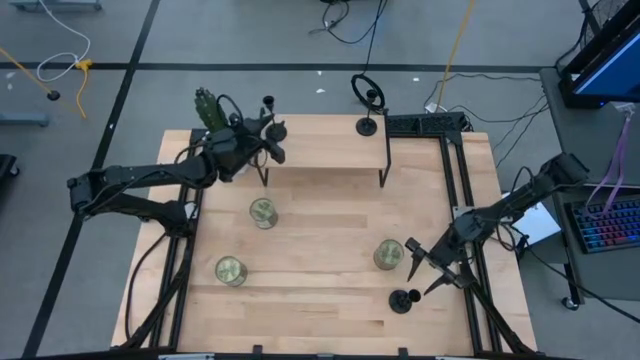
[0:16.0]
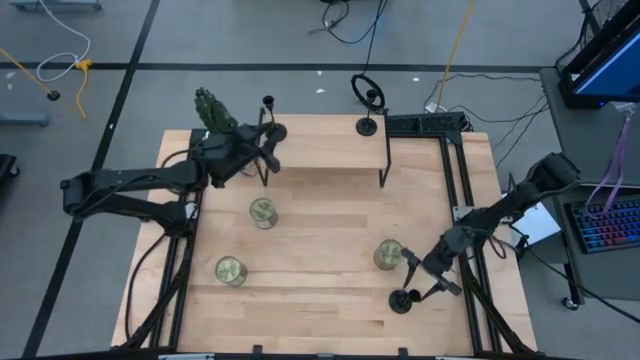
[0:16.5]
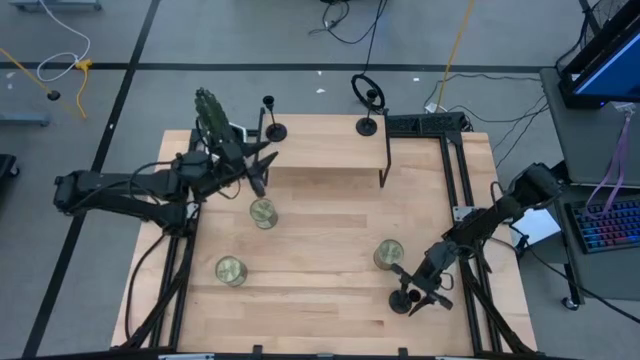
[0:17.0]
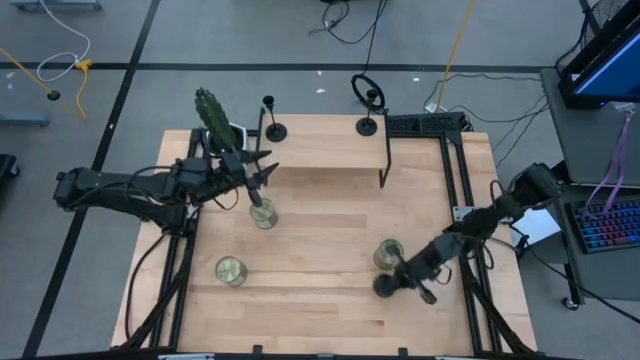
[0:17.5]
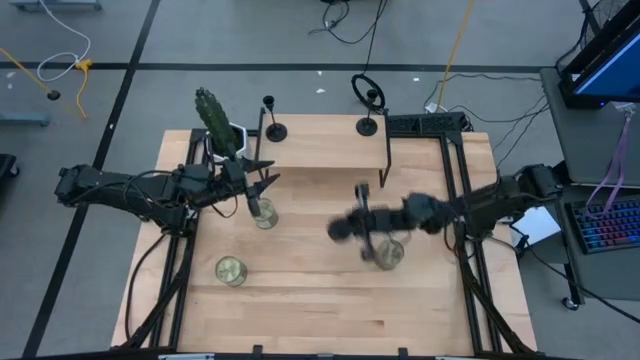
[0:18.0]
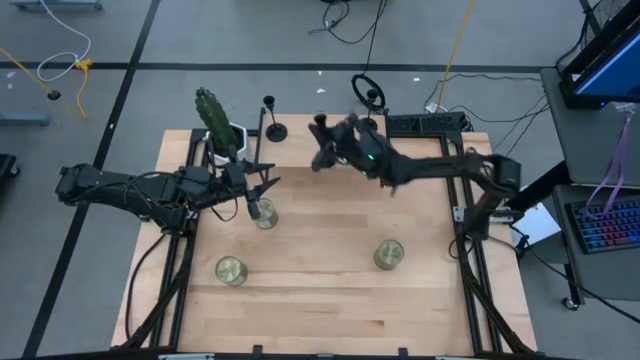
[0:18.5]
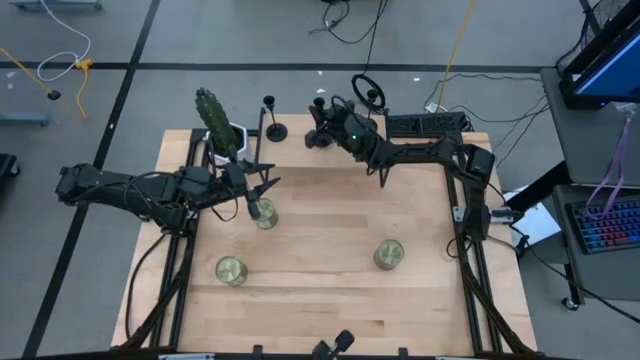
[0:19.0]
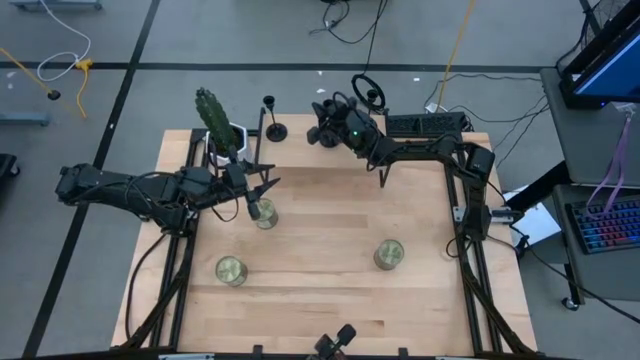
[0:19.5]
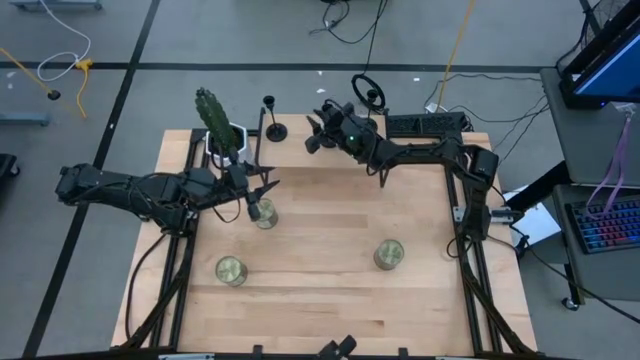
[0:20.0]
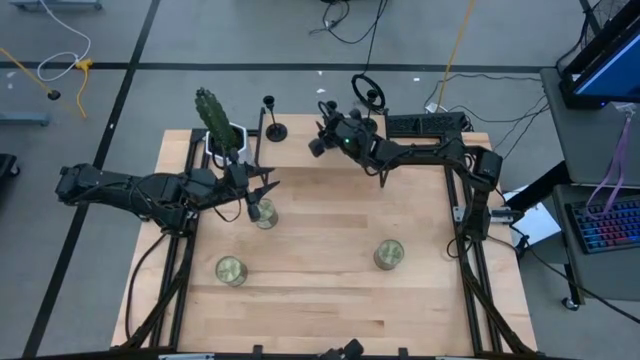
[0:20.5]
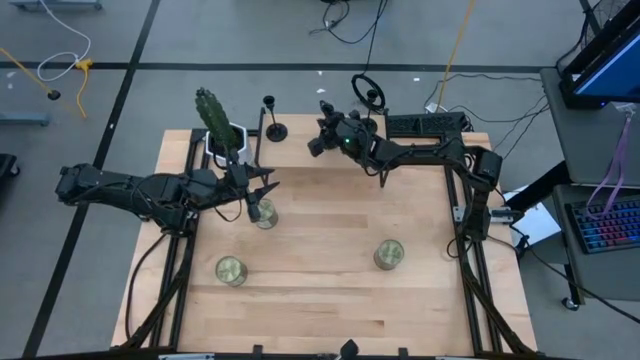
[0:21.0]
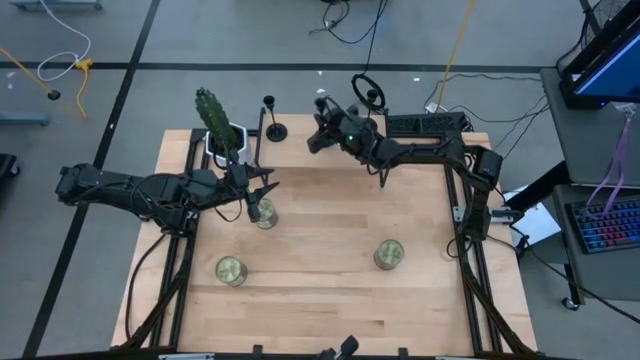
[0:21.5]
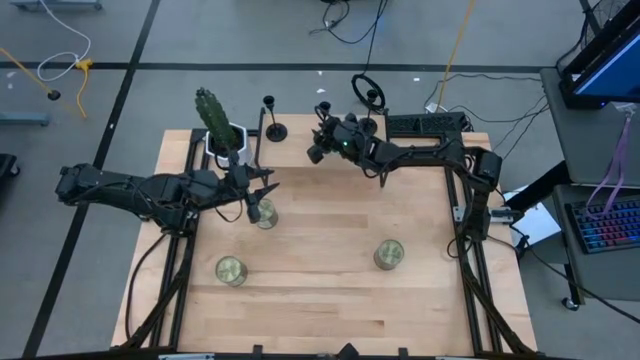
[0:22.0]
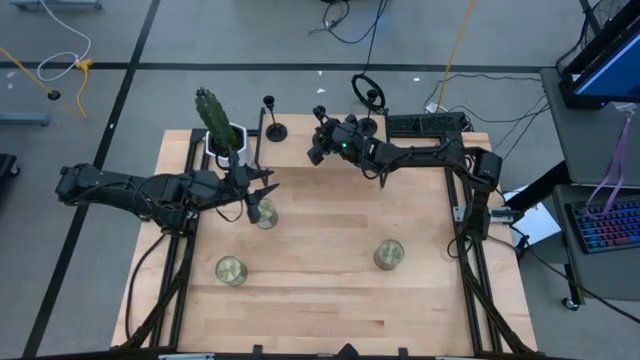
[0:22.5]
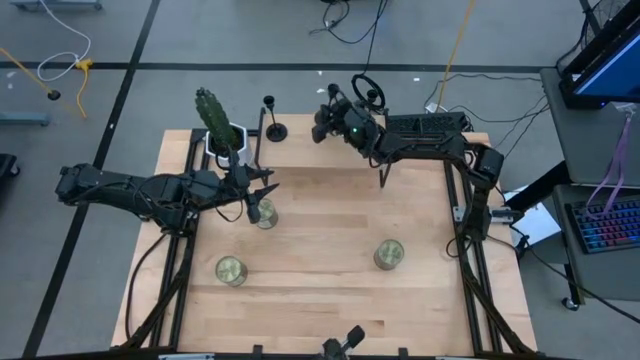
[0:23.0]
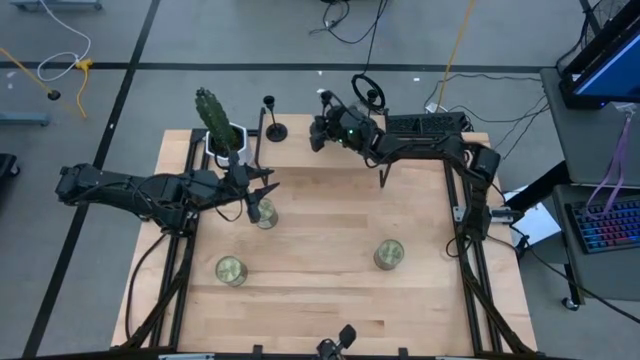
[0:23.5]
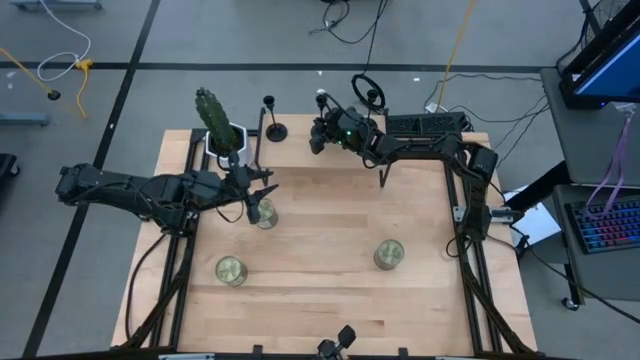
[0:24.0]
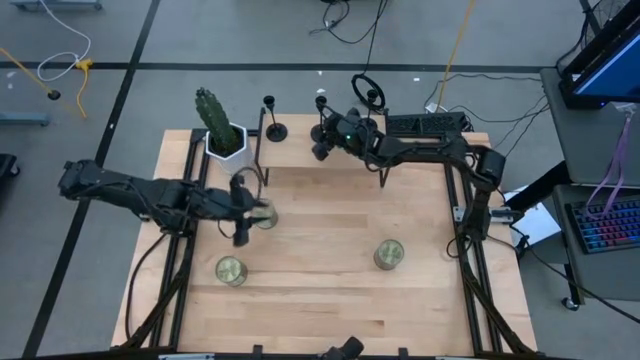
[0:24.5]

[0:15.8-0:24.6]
Task: Pick & Place candle stick holders
Put the black candle holder on the shelf

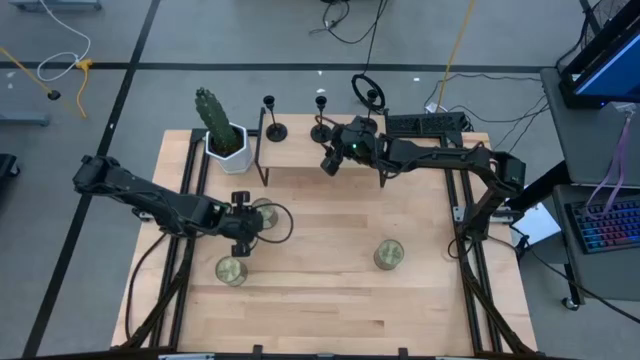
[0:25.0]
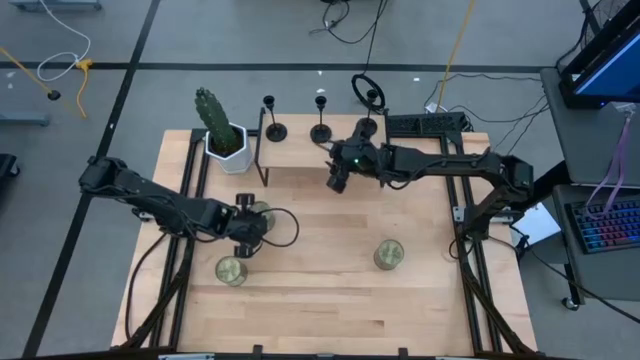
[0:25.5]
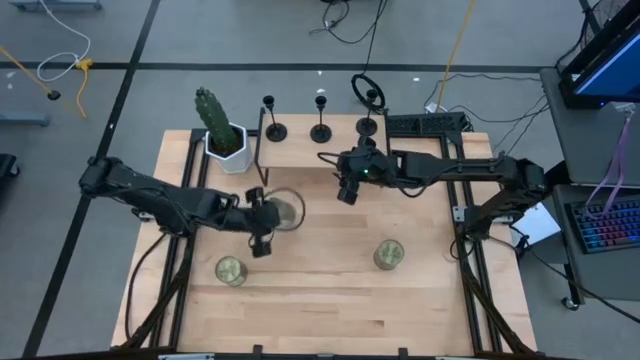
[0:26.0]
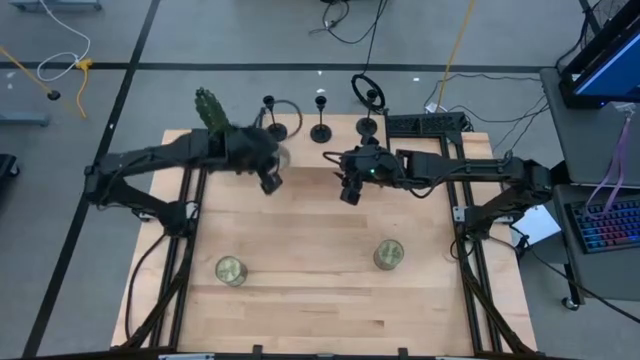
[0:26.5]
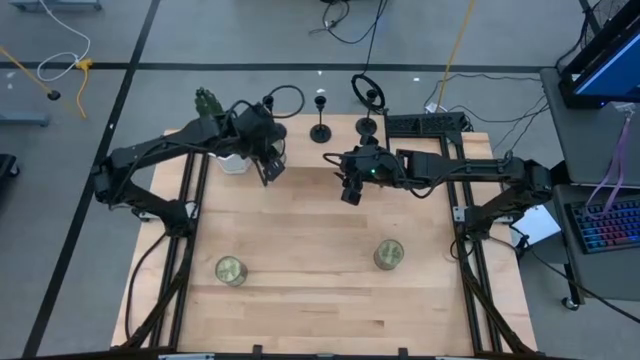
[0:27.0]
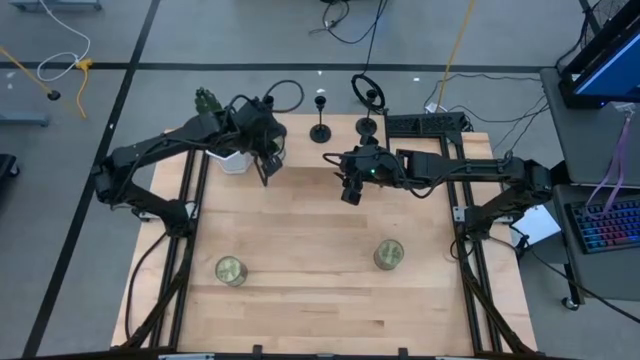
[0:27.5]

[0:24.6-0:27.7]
Put the top green scented candle on the shelf

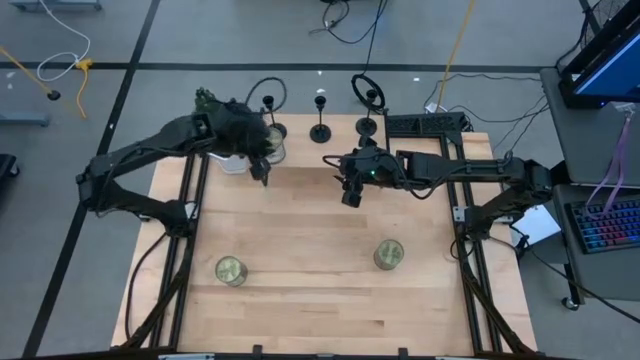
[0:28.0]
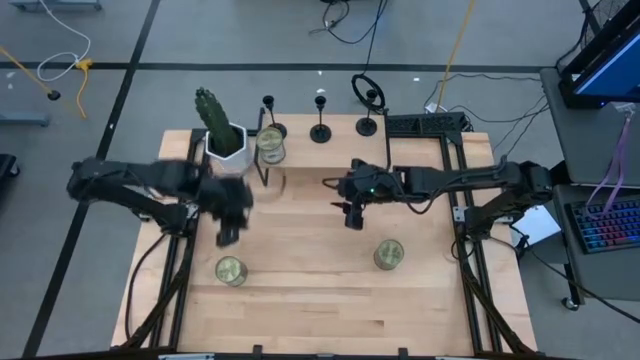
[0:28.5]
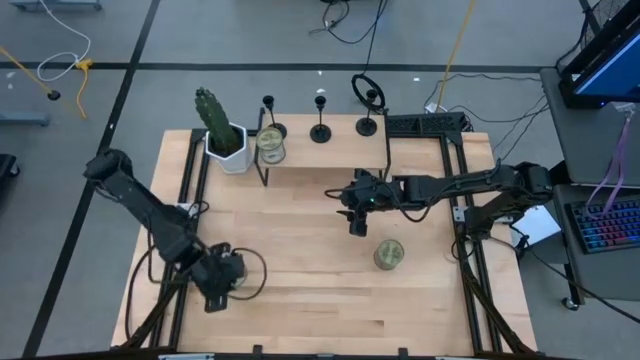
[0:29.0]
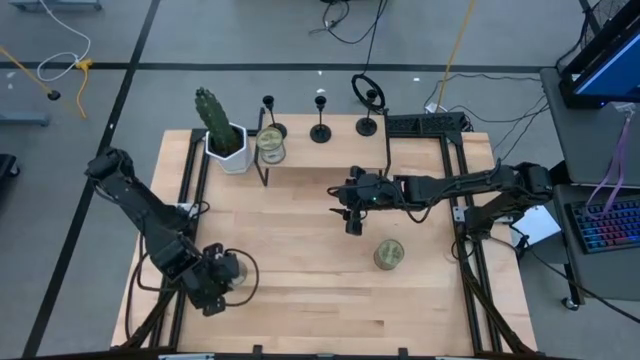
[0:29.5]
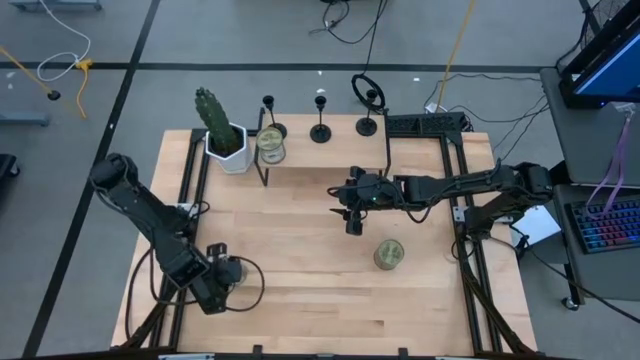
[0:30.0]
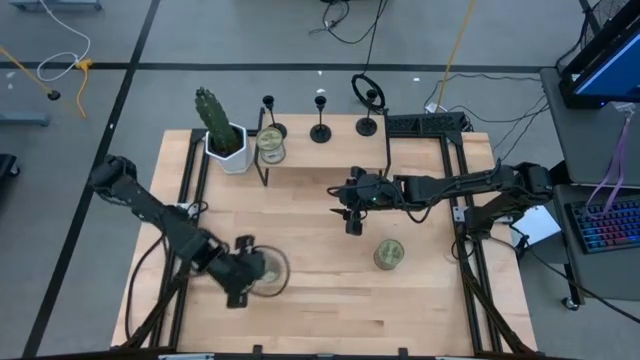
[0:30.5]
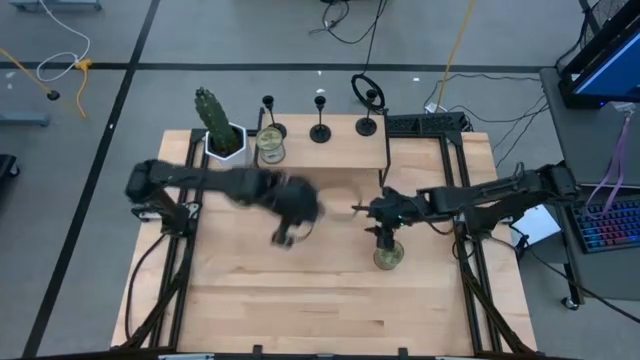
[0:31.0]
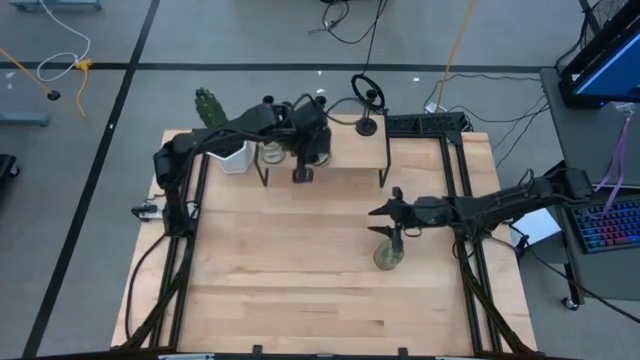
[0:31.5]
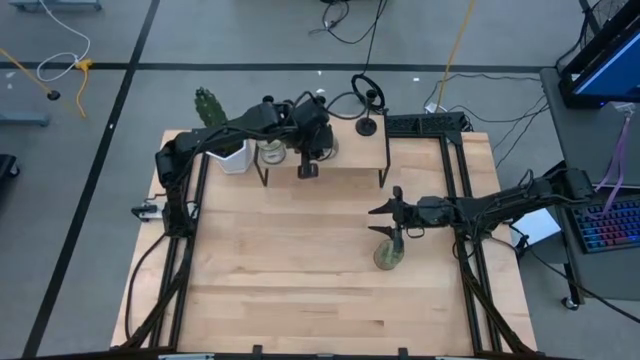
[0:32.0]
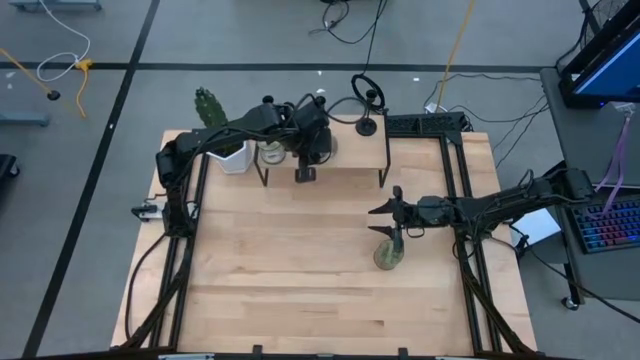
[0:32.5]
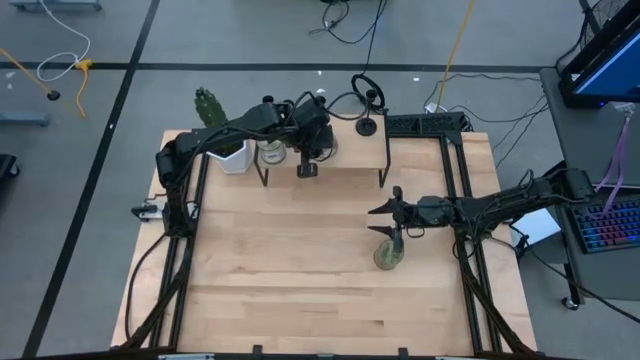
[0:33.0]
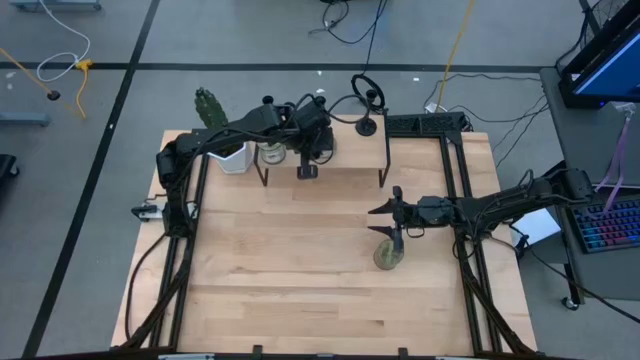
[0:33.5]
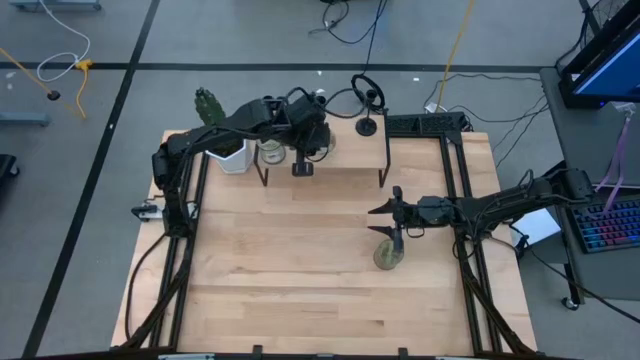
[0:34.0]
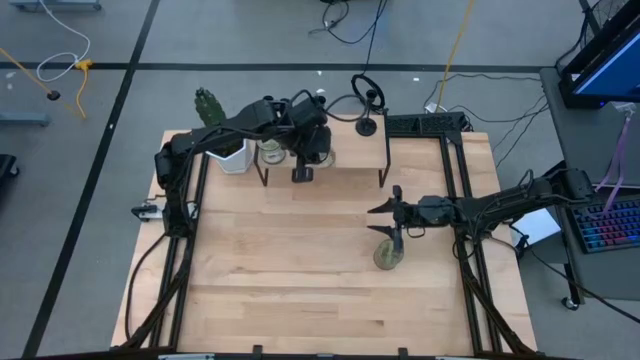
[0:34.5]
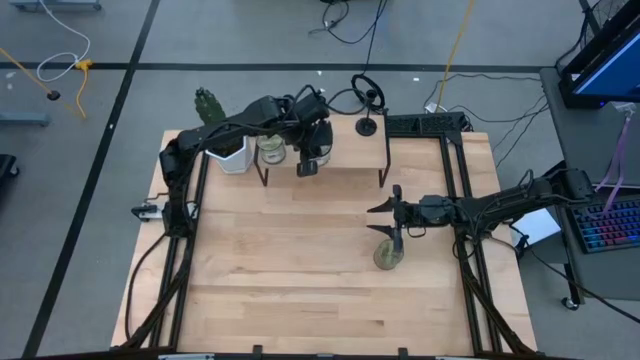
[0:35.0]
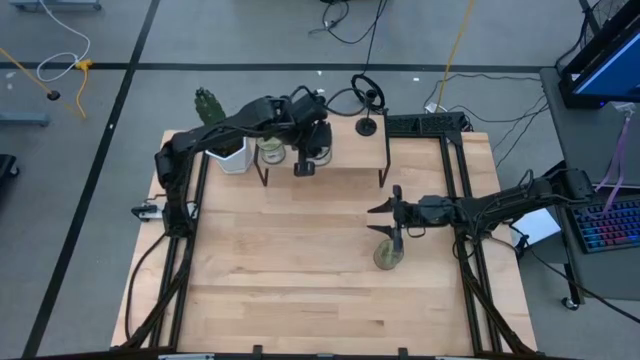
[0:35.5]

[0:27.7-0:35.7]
Put the left green scented candle on the shelf

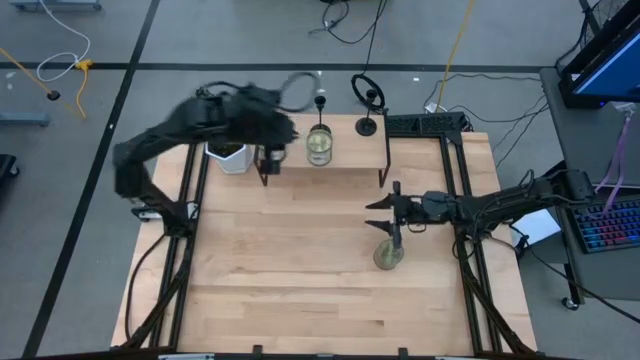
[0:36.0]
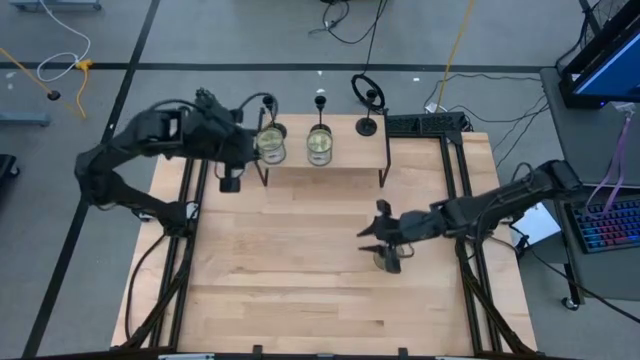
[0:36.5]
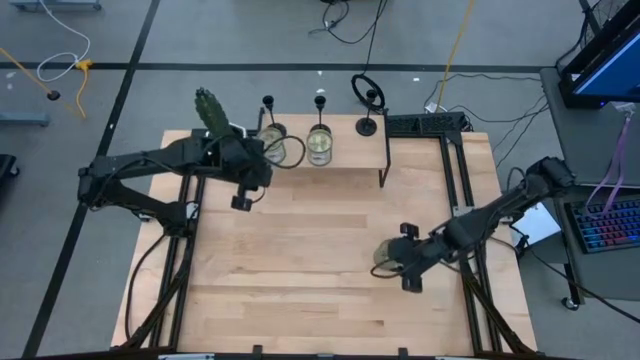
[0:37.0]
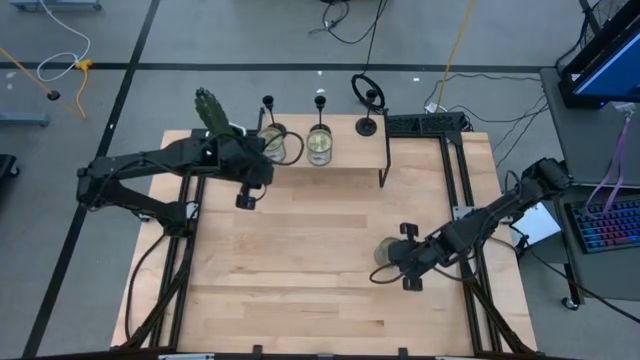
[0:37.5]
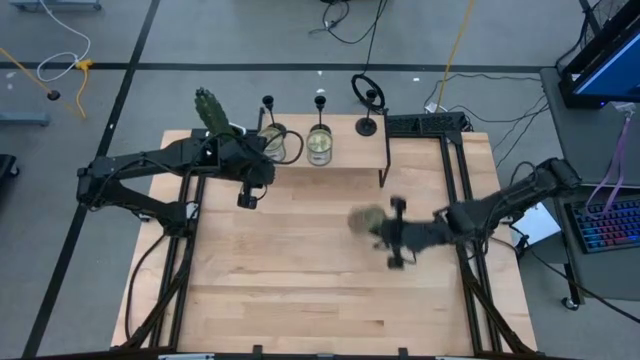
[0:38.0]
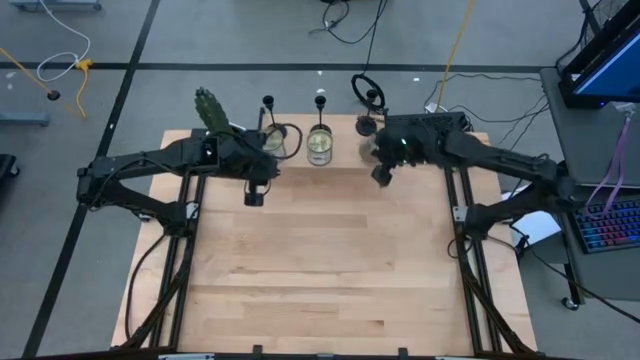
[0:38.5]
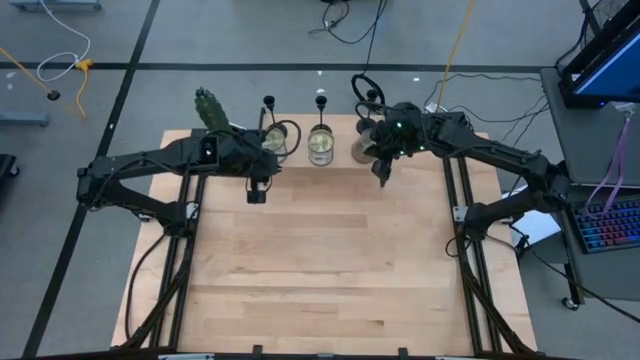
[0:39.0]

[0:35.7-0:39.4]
Put the green scented candle on the shelf
